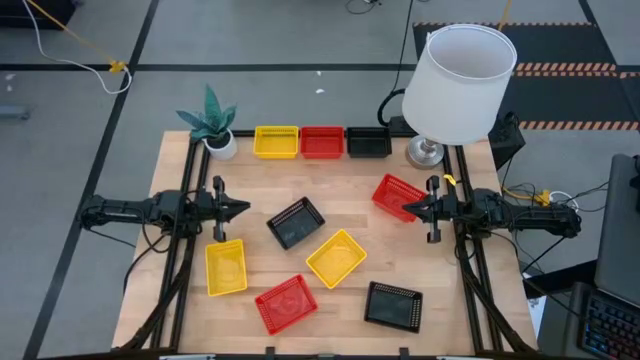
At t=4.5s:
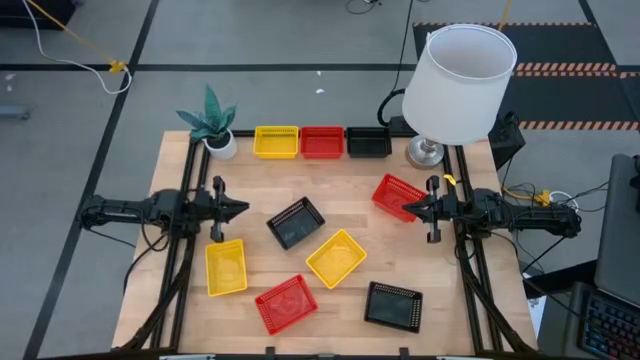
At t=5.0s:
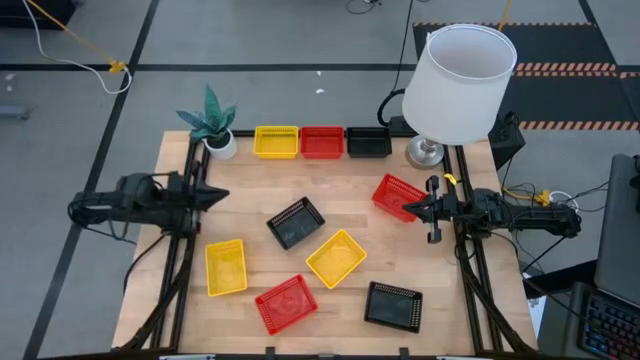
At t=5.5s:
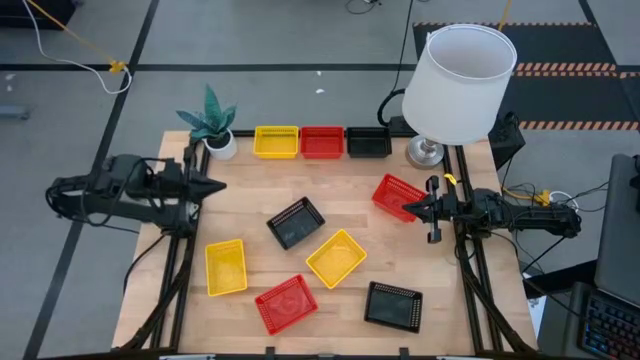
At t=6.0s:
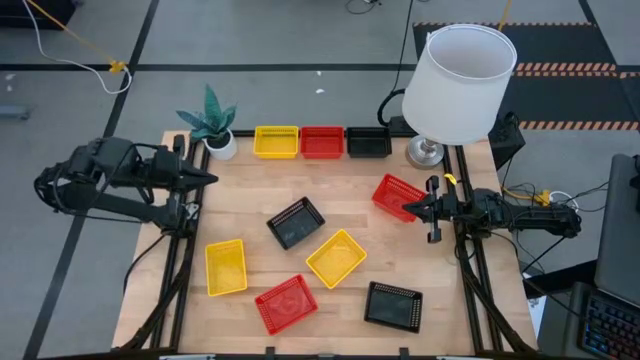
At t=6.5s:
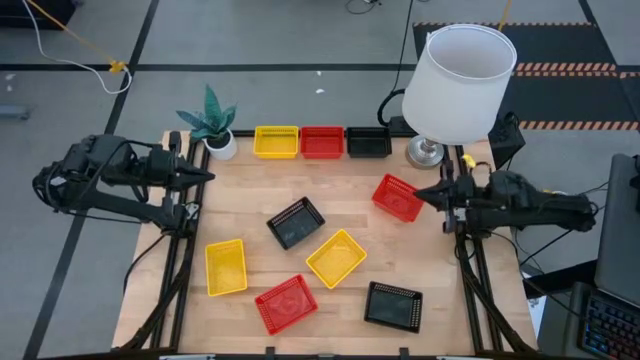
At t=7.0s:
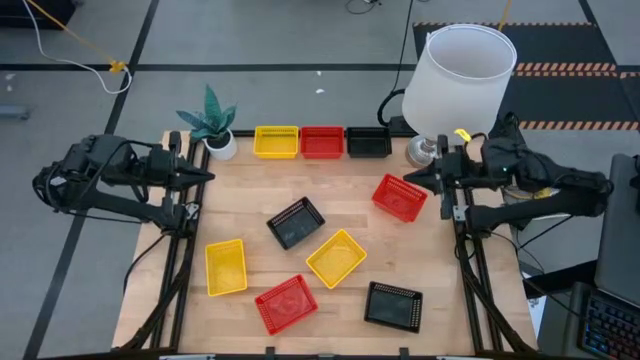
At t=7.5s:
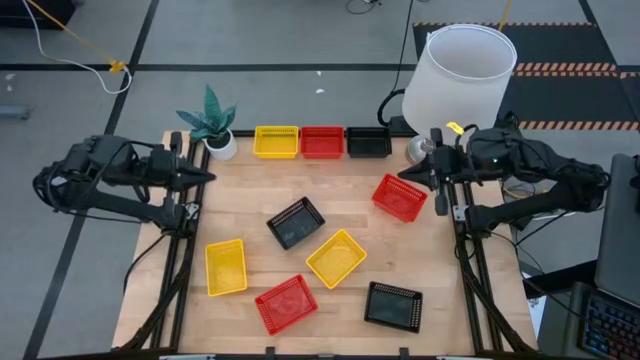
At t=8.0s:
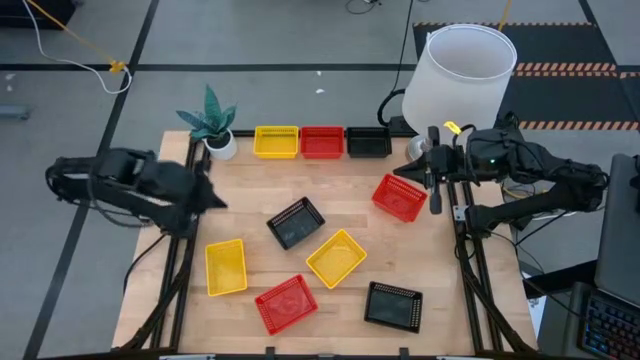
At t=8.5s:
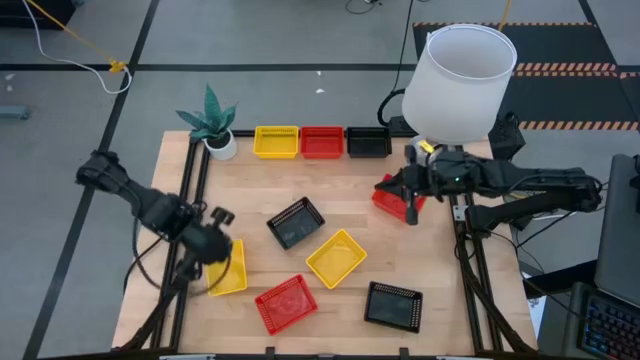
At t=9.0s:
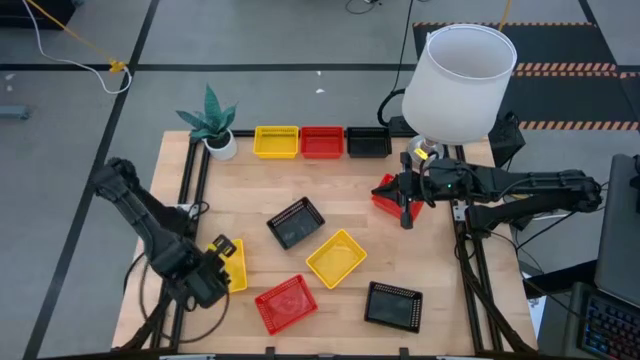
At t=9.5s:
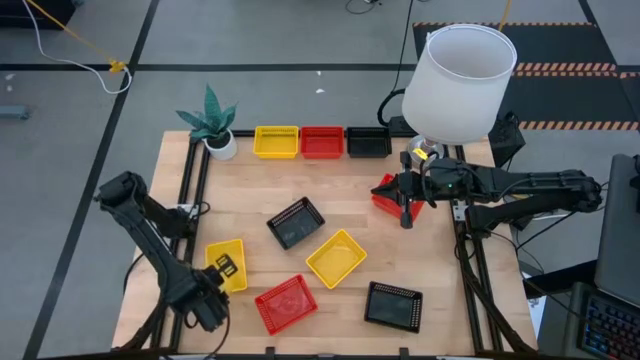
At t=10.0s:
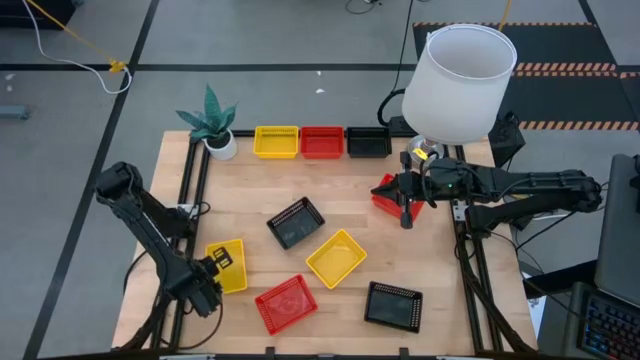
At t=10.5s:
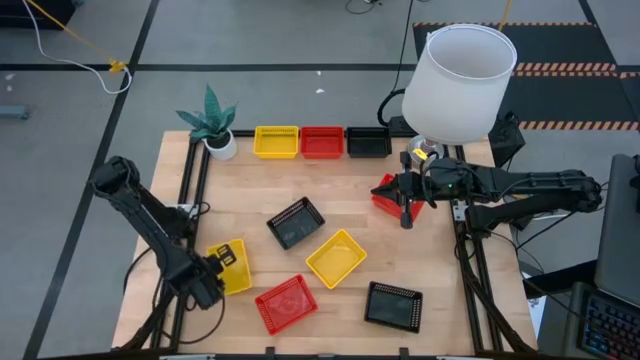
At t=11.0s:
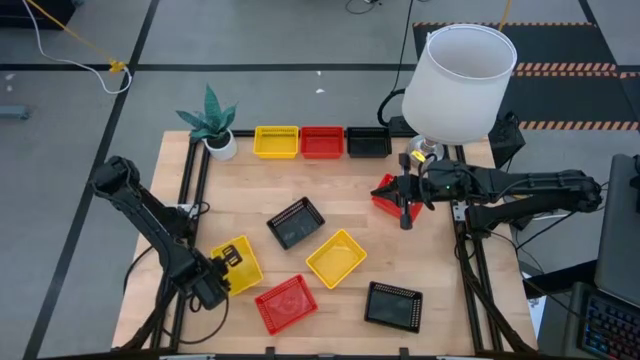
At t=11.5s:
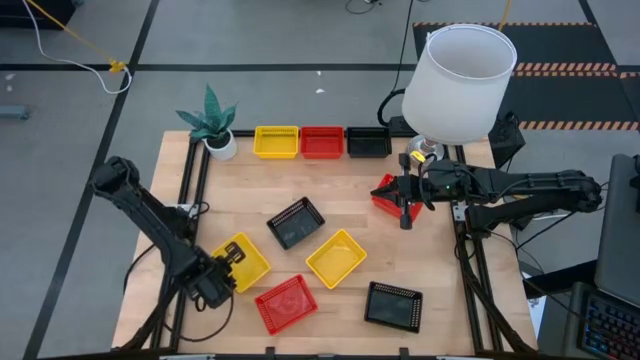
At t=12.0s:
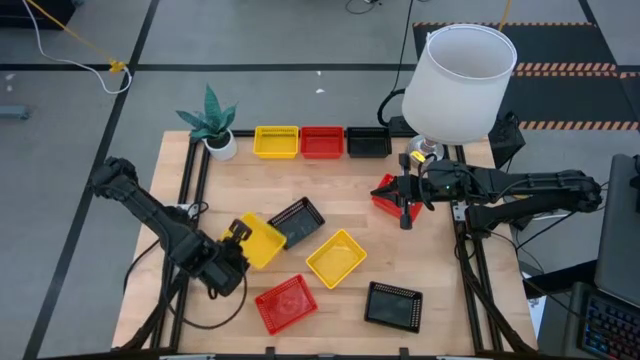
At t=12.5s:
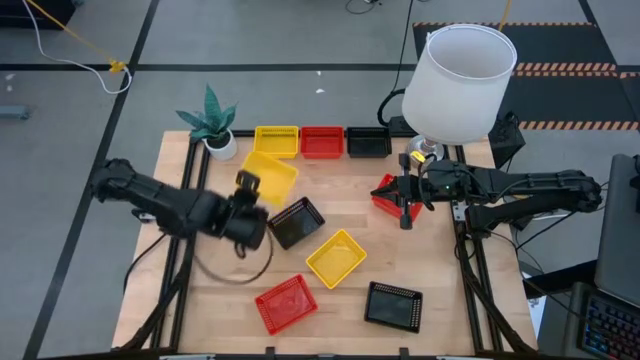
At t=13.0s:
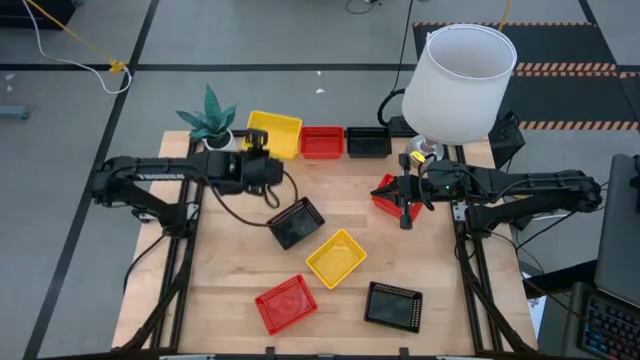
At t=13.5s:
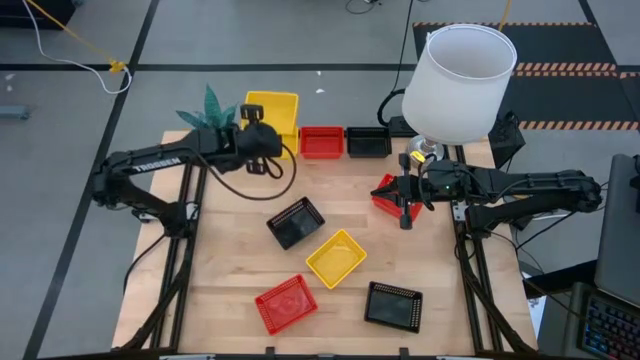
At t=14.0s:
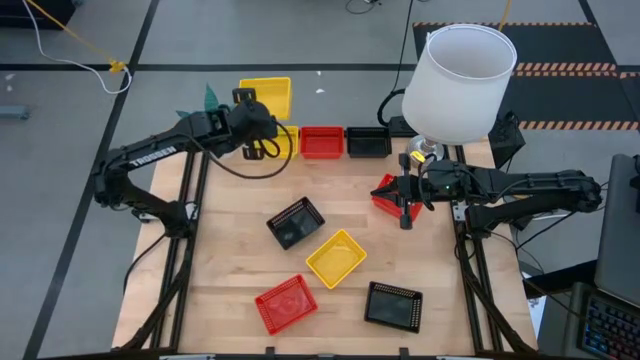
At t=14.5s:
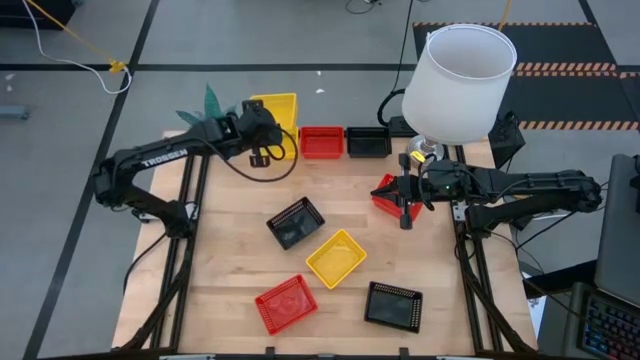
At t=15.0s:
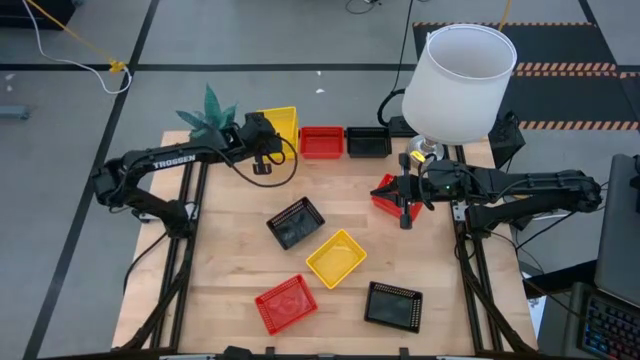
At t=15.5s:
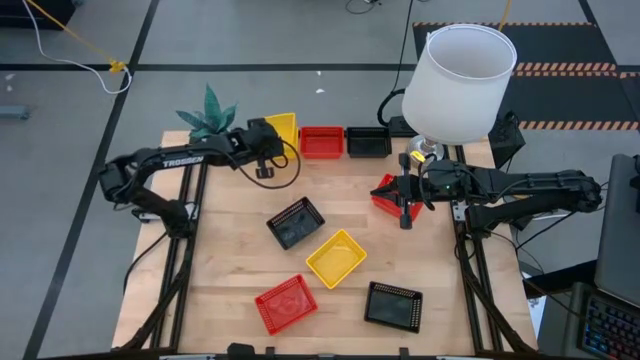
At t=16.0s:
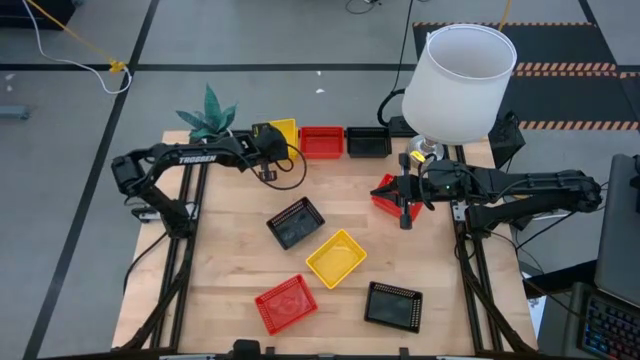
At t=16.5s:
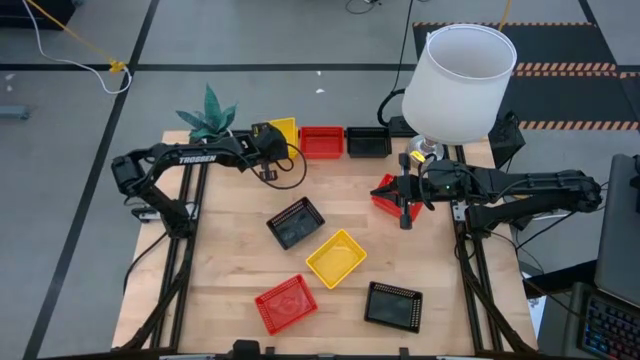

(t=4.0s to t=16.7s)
Stack the bottom left yellow bin on the top yellow bin
